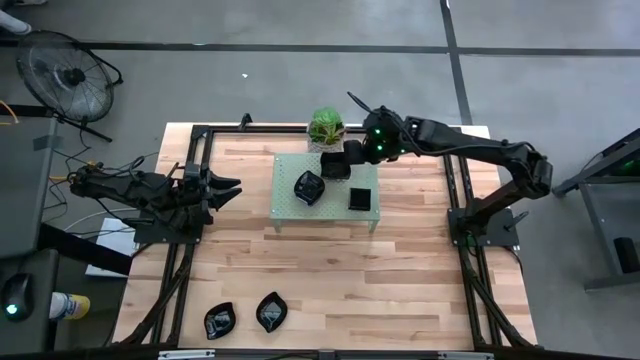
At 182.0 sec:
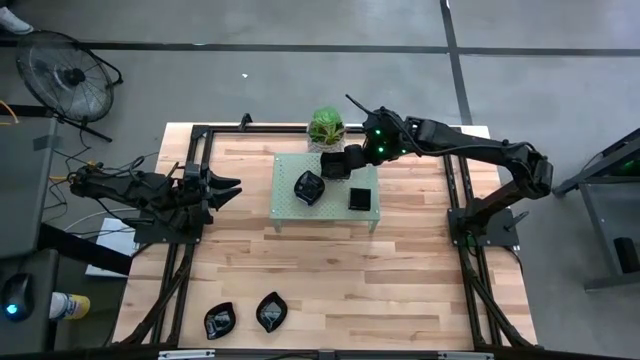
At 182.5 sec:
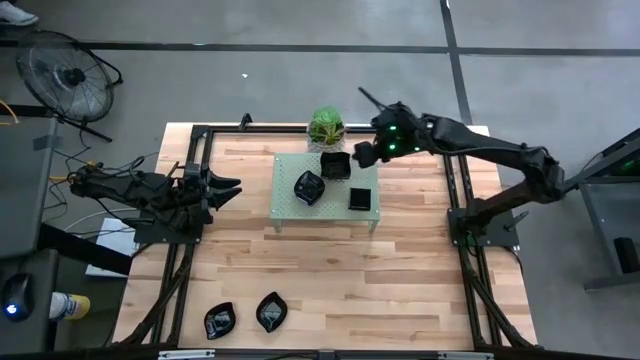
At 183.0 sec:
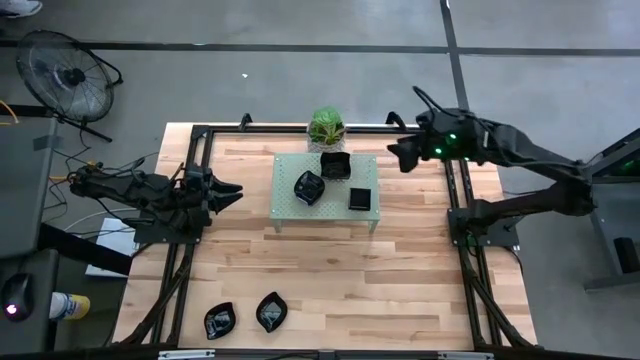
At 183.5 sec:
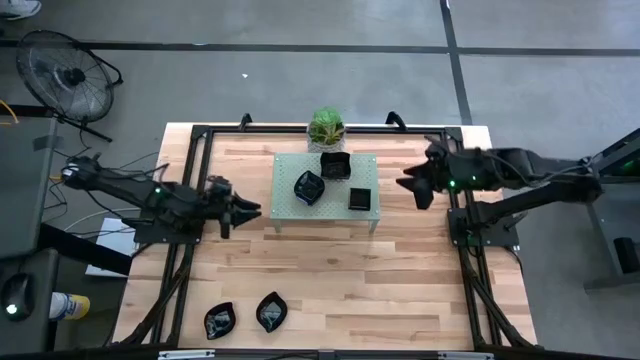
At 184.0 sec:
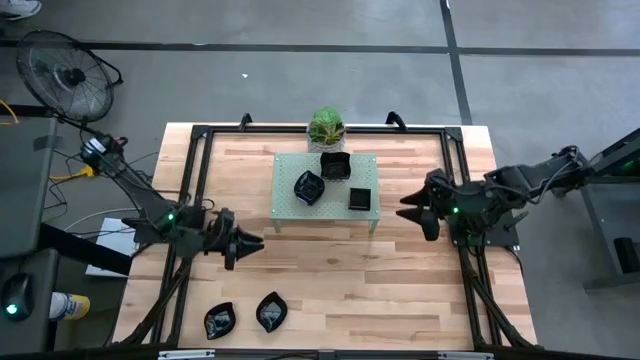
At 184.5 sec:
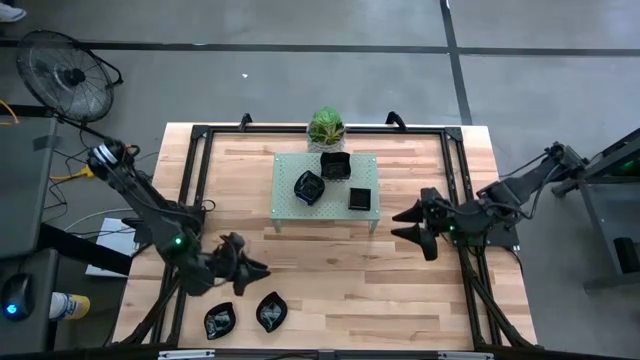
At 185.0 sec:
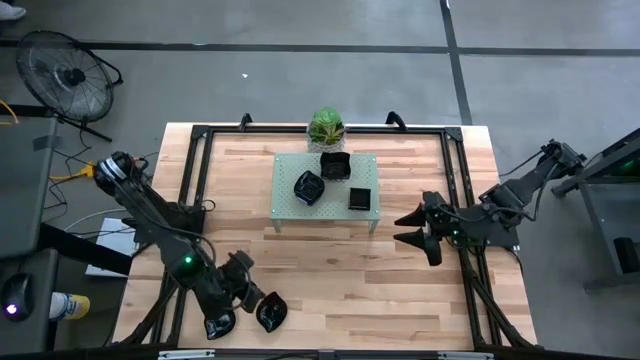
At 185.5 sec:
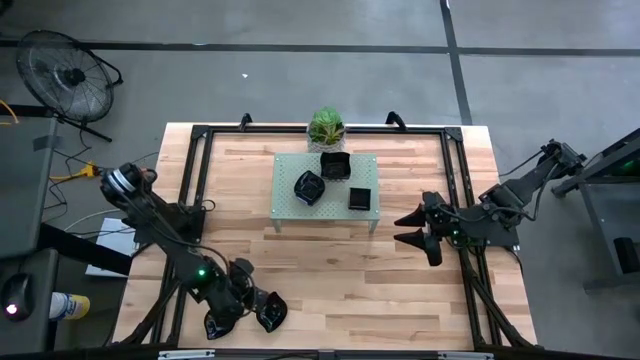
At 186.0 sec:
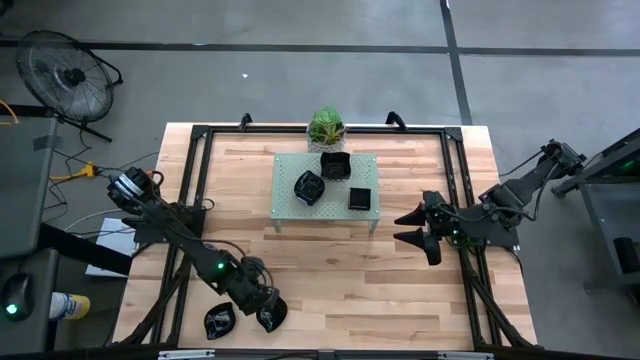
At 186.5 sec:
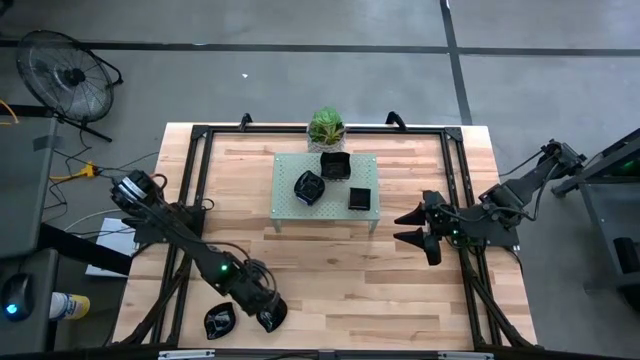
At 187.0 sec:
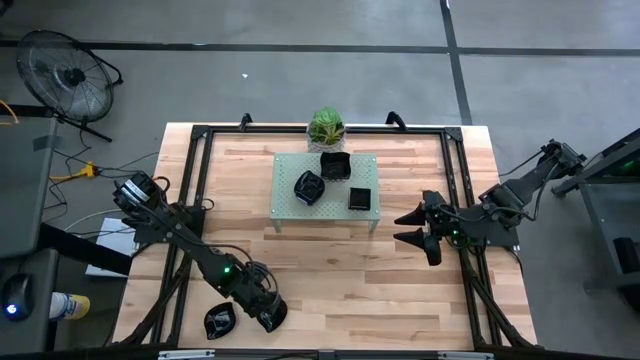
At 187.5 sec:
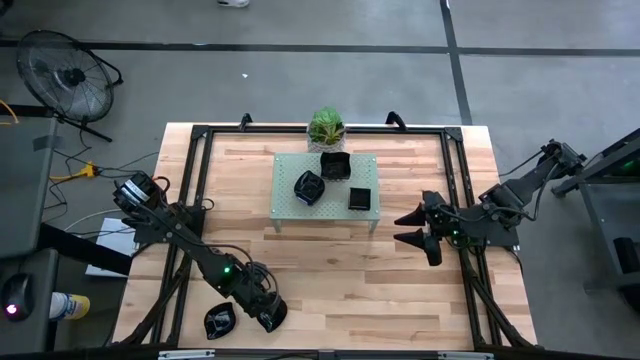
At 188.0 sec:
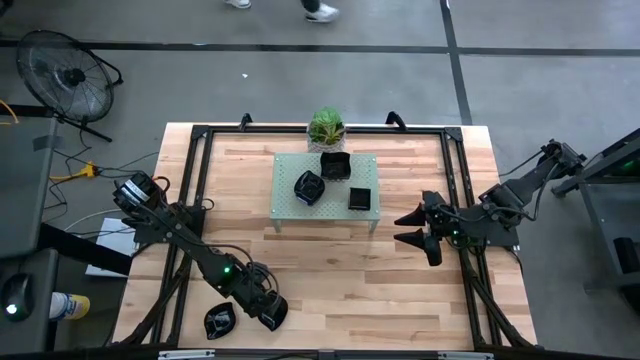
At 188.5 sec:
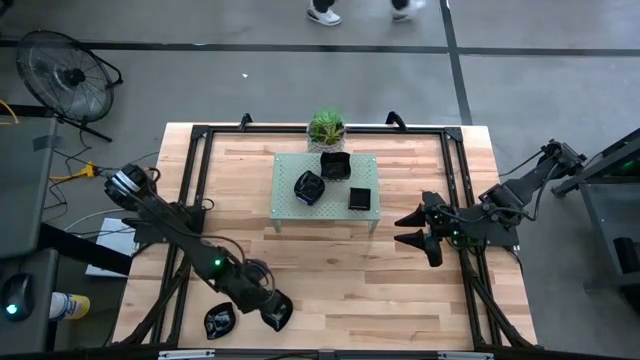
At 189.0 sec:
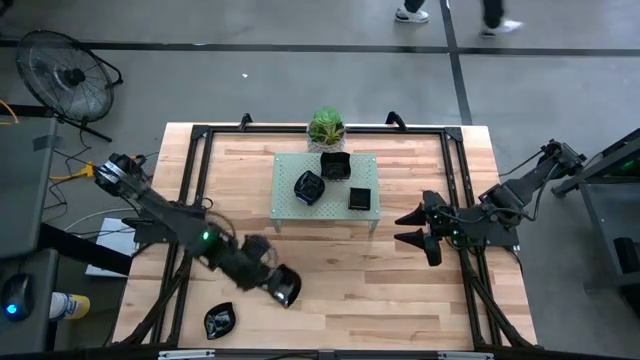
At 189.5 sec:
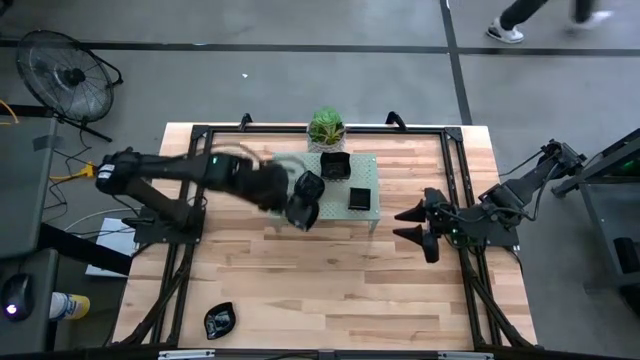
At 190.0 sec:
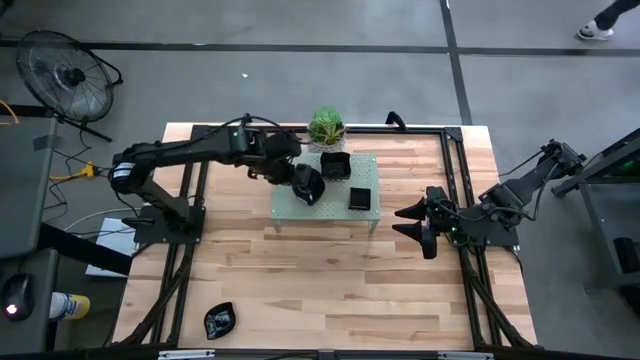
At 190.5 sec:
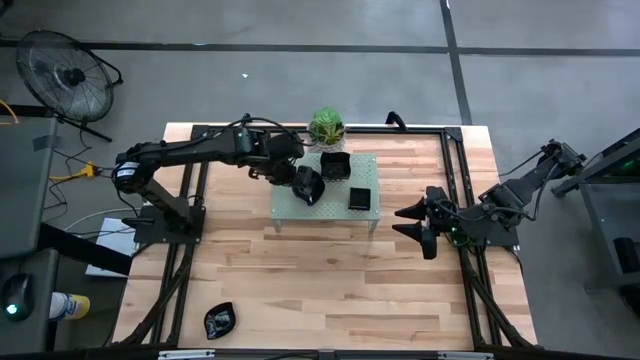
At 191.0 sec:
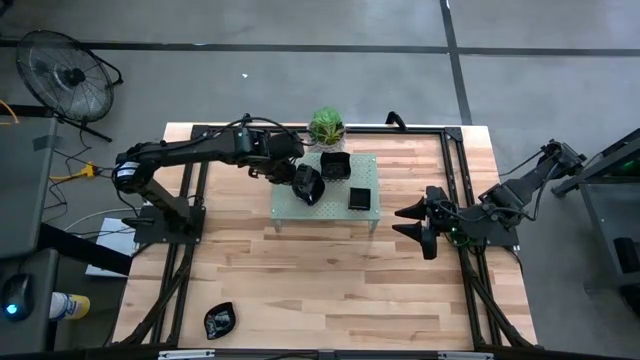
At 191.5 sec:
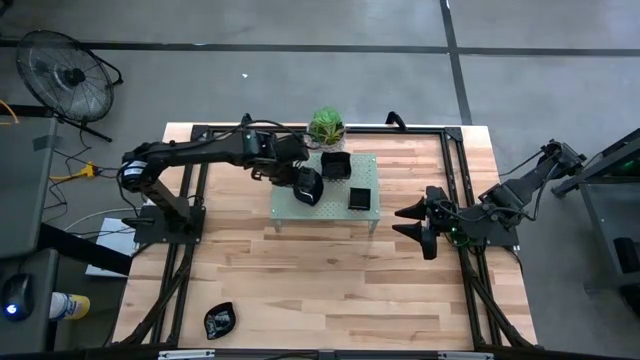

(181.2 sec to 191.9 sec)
Task: Pick & Place Mini shaped plates
Stack the black leaf plate on the other black leaf plate on the shelf

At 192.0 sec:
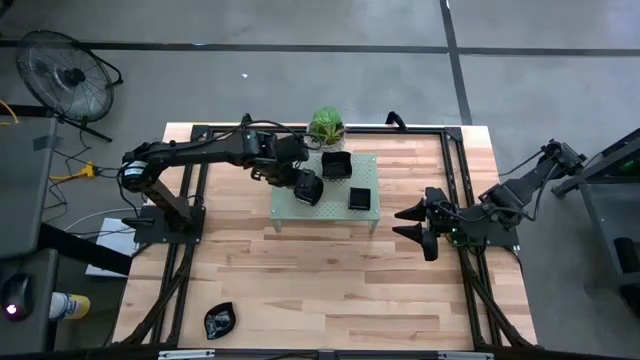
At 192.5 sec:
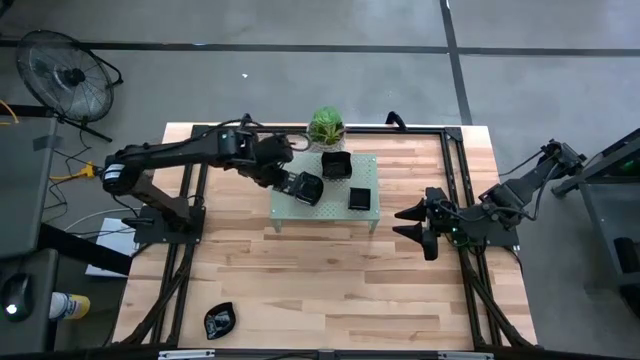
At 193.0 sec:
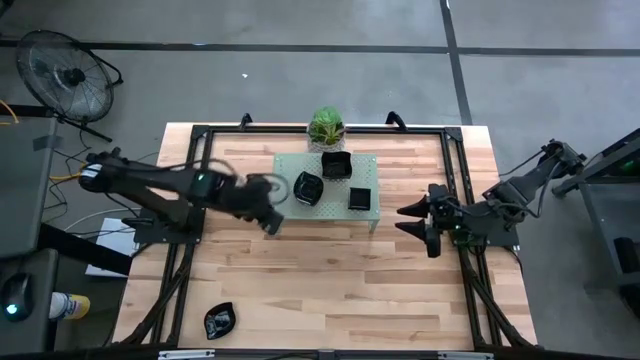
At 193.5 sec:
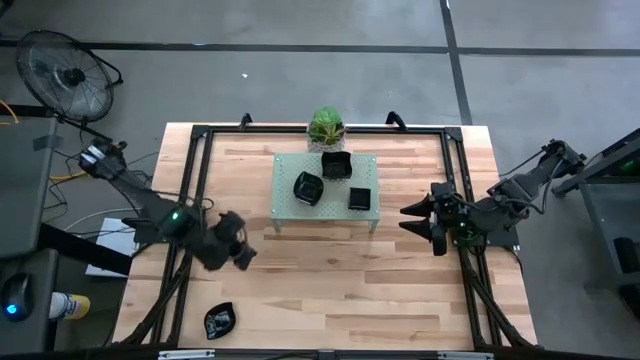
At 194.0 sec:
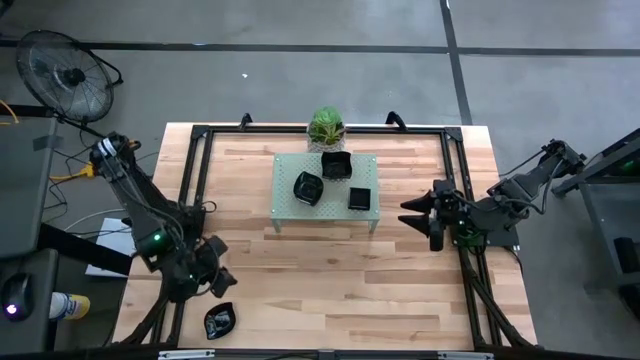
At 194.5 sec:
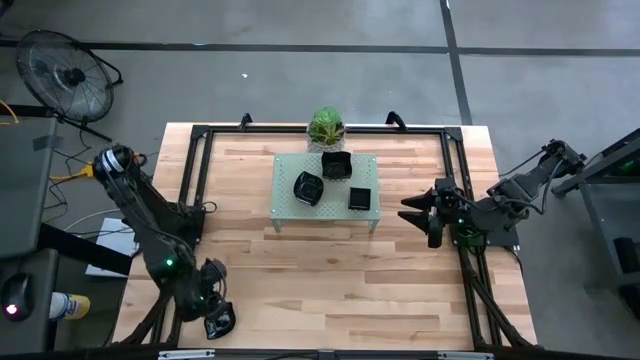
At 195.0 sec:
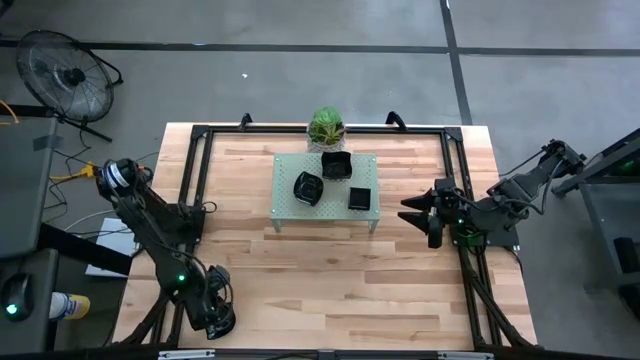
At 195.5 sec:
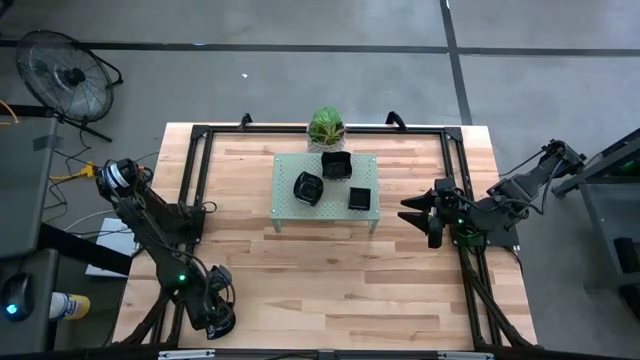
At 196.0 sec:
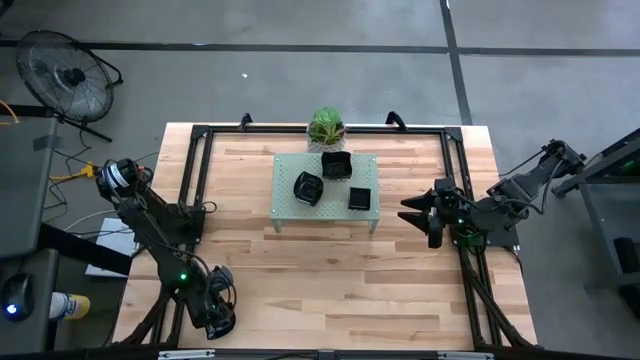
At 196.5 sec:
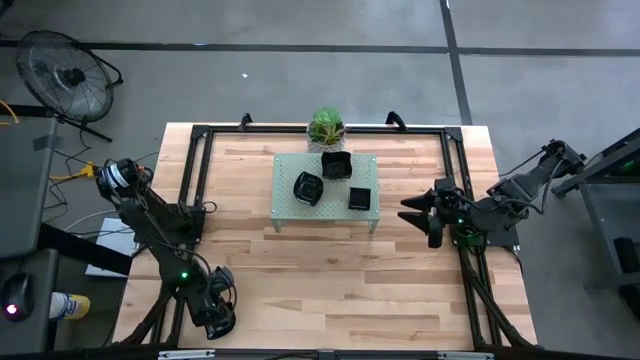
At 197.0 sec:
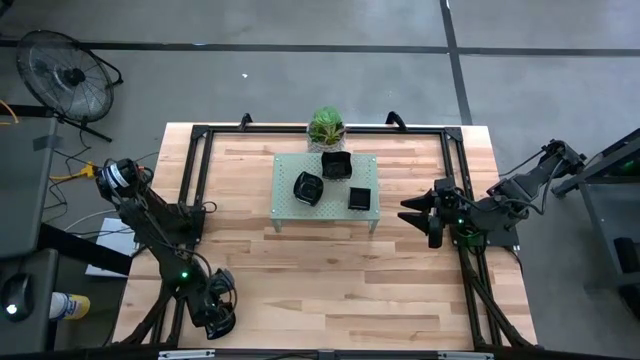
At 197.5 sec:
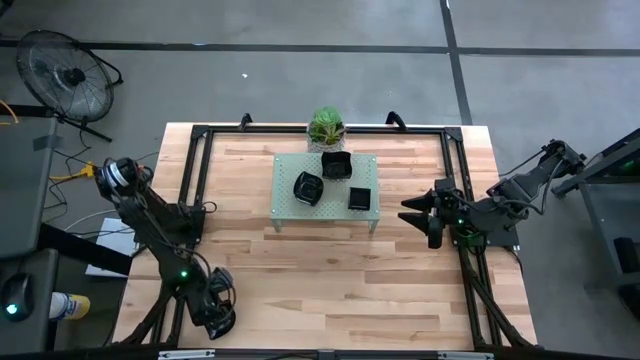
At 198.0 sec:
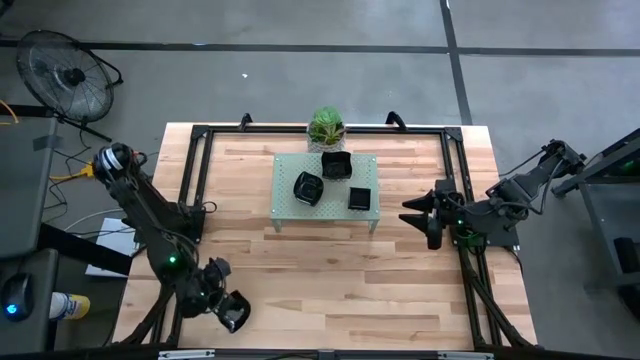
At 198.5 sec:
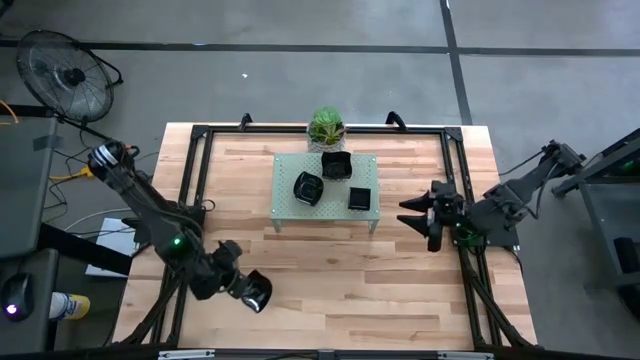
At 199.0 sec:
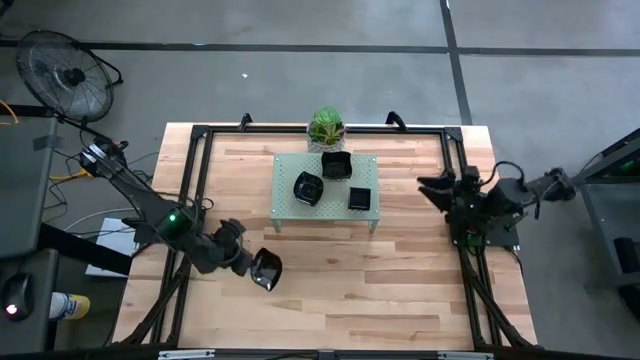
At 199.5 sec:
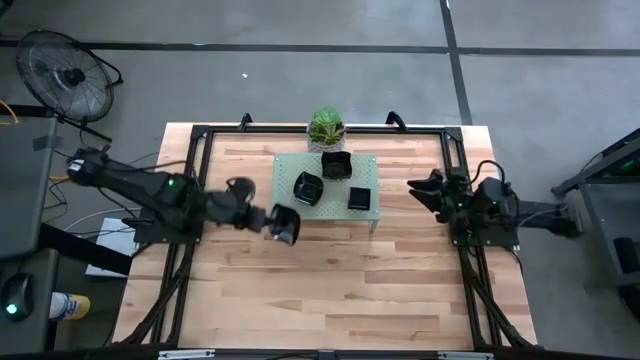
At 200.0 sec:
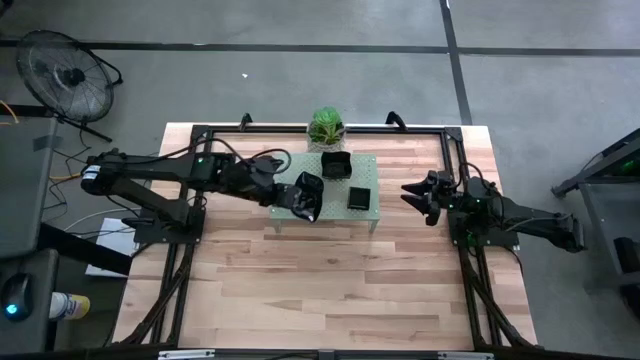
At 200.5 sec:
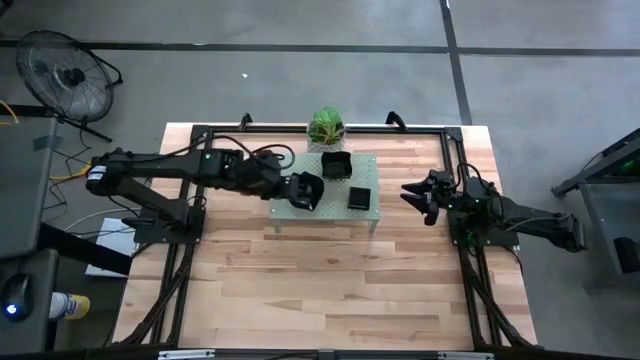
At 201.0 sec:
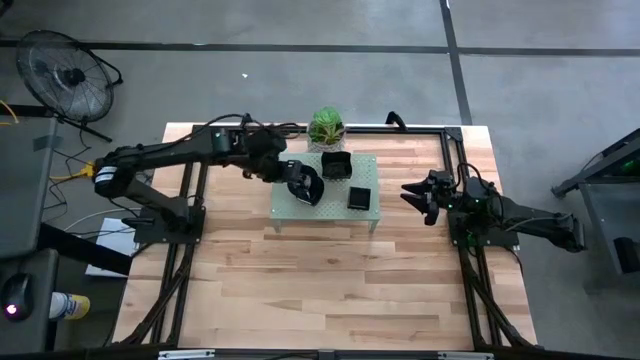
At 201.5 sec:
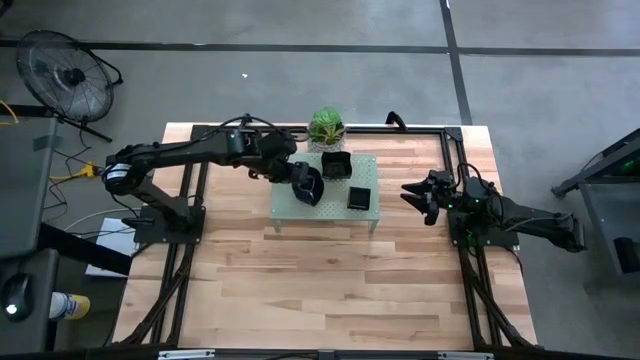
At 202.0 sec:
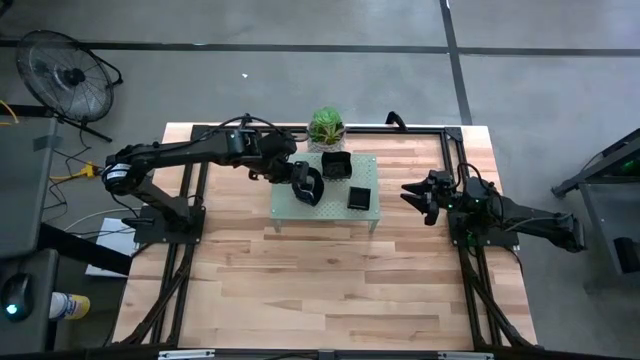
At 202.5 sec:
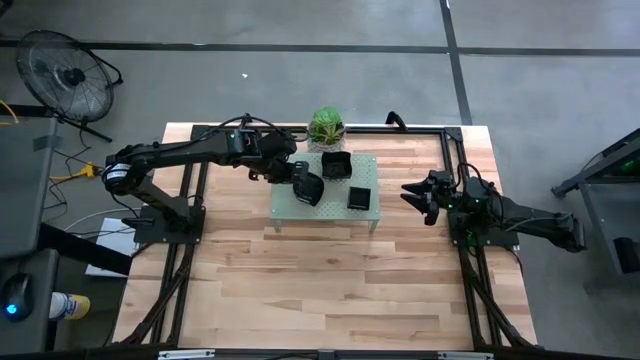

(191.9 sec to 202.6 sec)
Stack the black leaf plate on the other black leaf plate on the shelf
